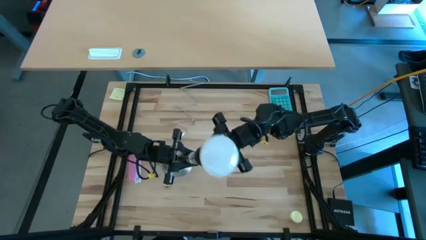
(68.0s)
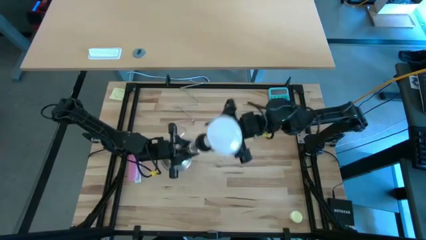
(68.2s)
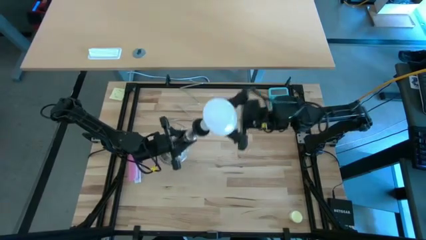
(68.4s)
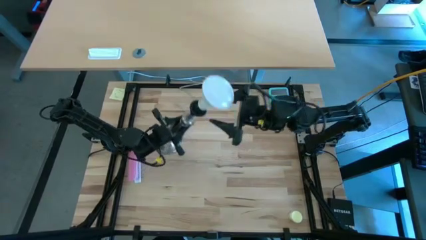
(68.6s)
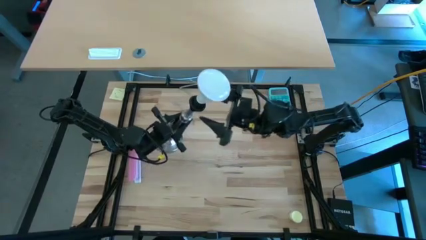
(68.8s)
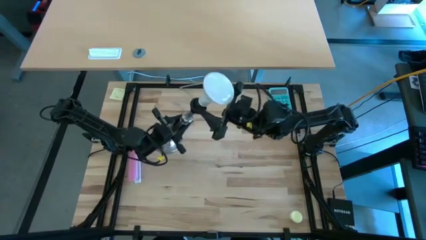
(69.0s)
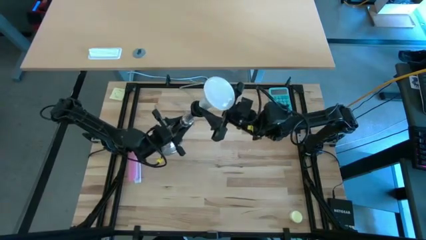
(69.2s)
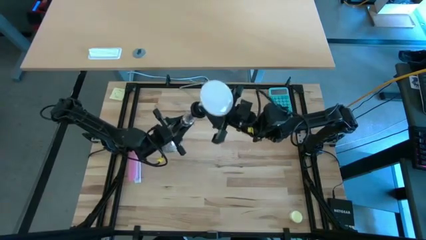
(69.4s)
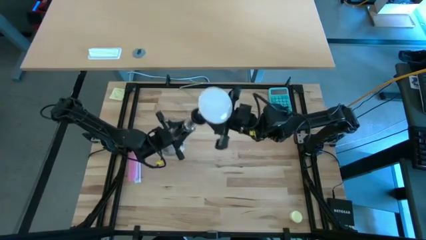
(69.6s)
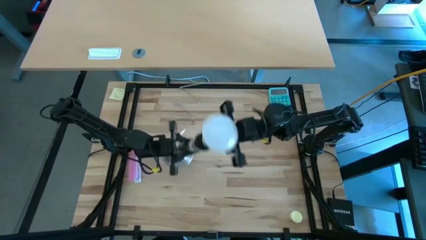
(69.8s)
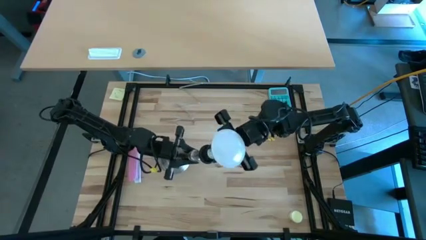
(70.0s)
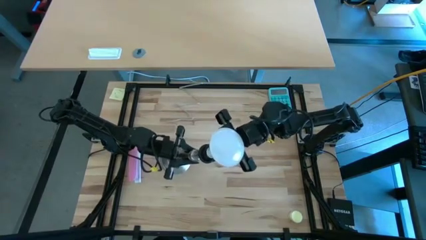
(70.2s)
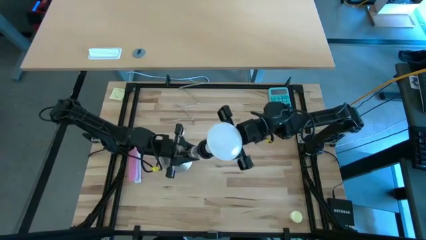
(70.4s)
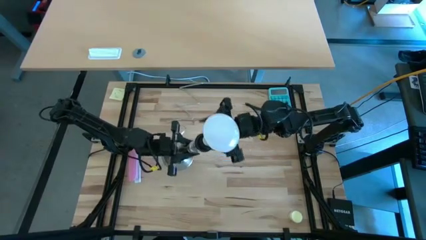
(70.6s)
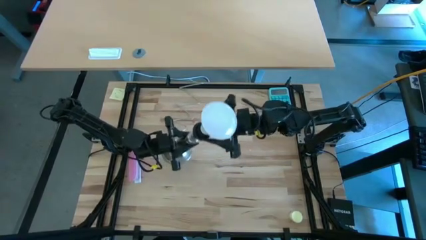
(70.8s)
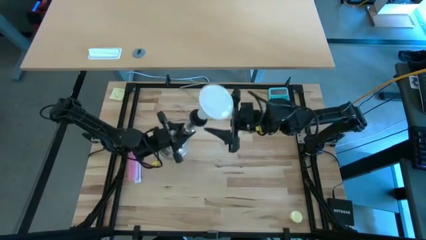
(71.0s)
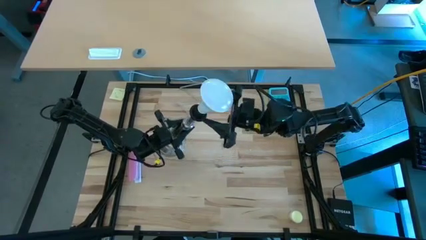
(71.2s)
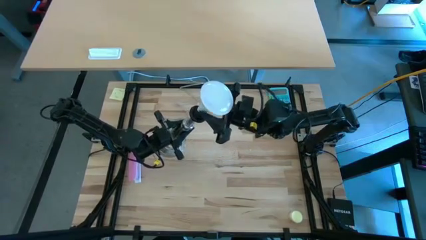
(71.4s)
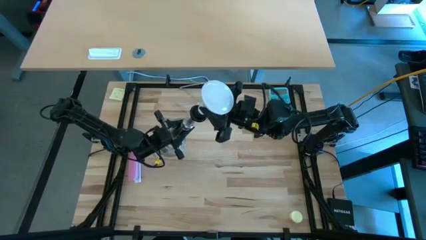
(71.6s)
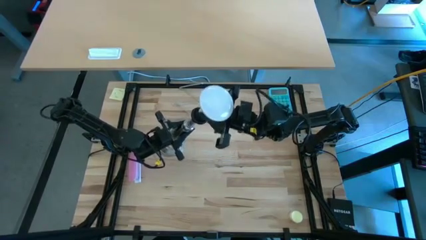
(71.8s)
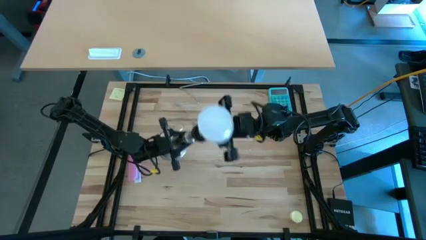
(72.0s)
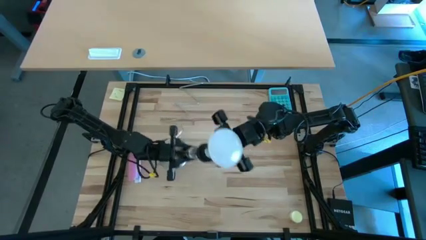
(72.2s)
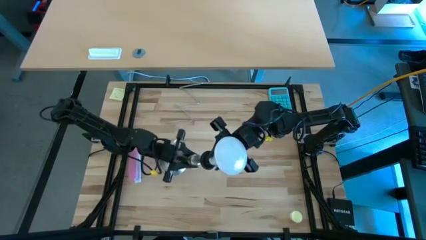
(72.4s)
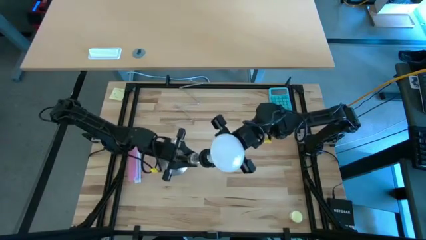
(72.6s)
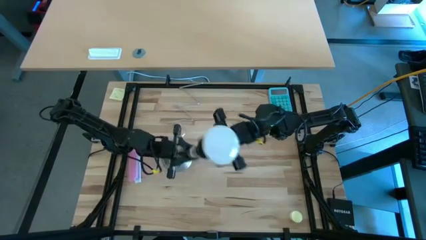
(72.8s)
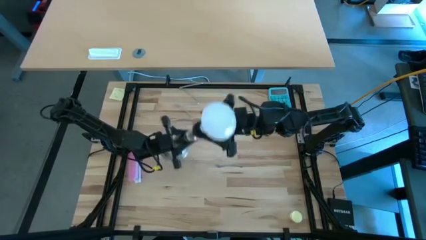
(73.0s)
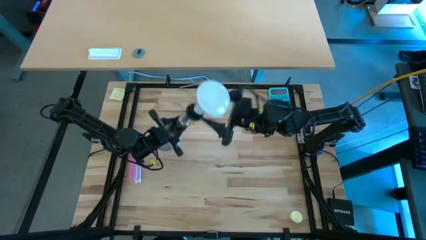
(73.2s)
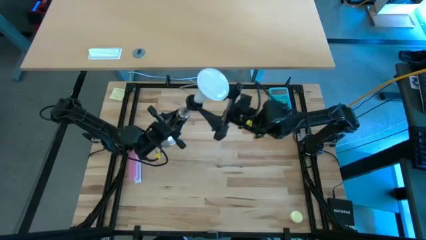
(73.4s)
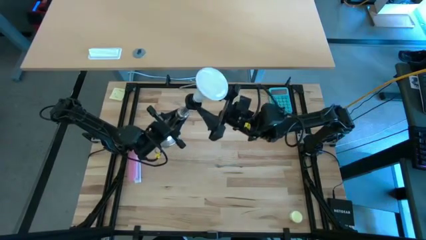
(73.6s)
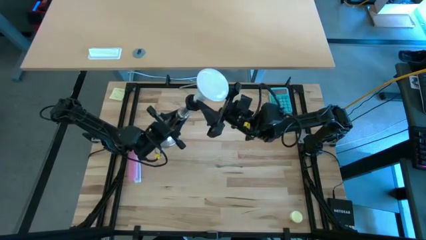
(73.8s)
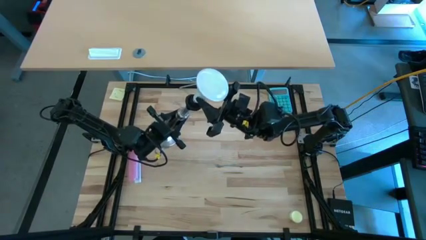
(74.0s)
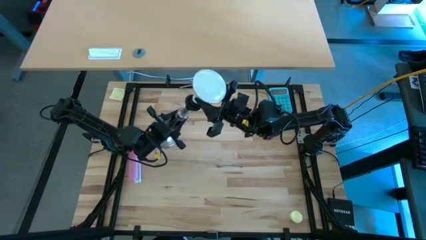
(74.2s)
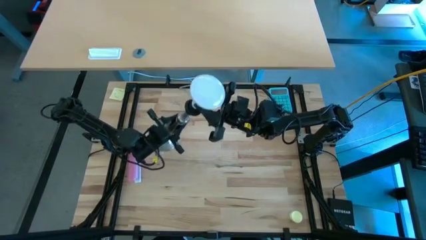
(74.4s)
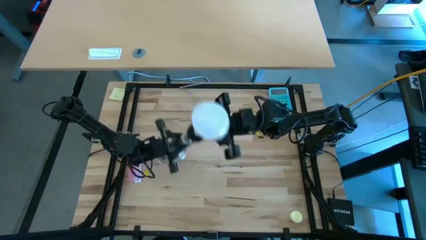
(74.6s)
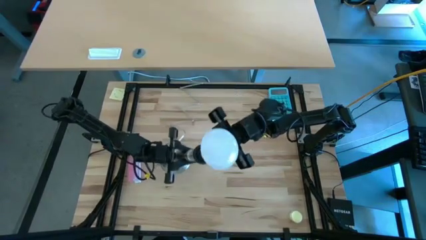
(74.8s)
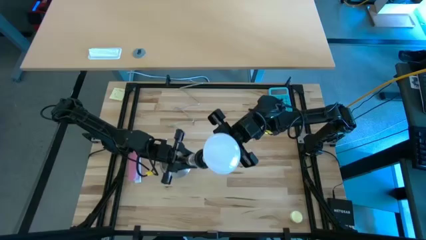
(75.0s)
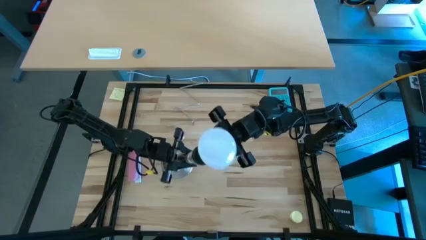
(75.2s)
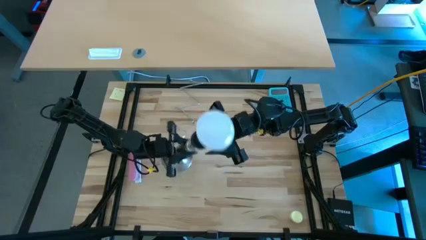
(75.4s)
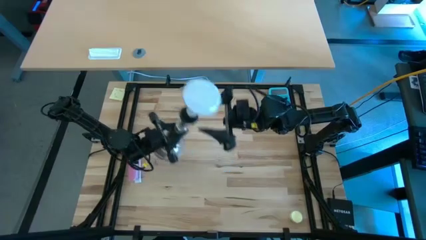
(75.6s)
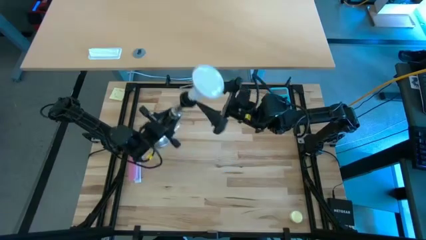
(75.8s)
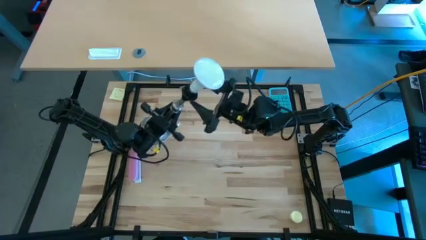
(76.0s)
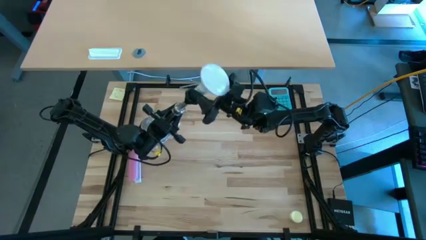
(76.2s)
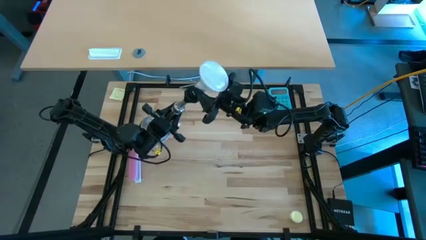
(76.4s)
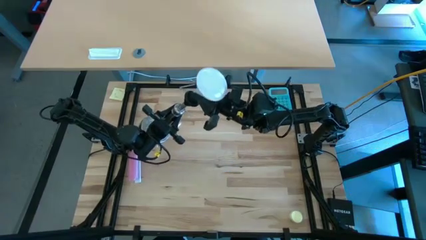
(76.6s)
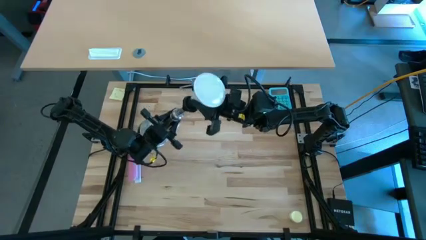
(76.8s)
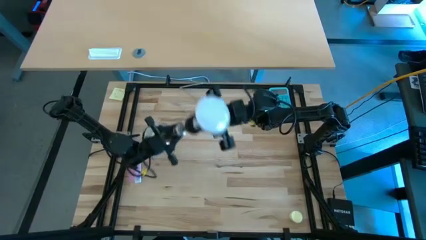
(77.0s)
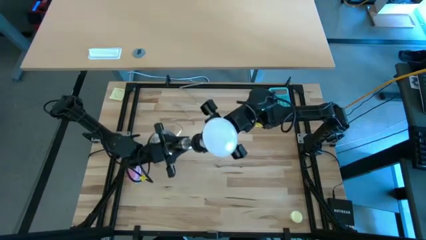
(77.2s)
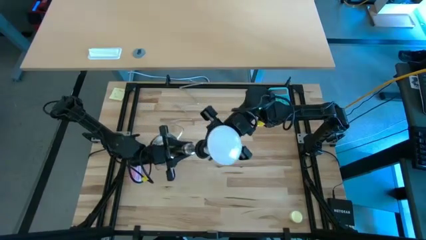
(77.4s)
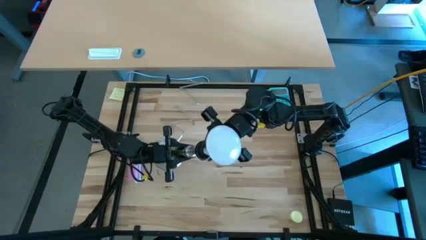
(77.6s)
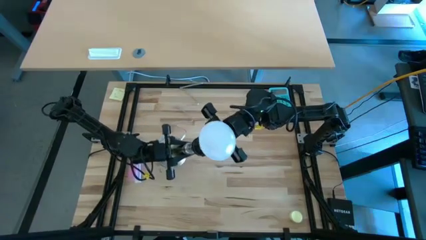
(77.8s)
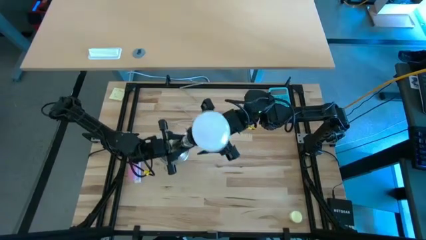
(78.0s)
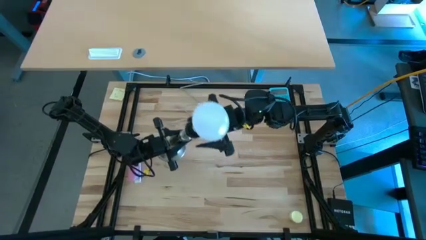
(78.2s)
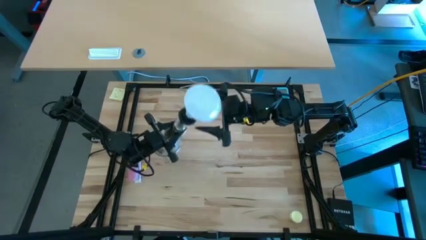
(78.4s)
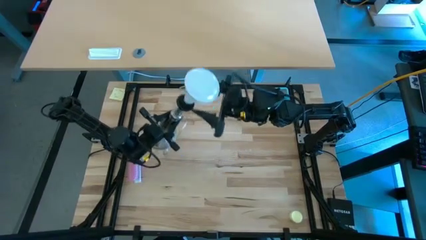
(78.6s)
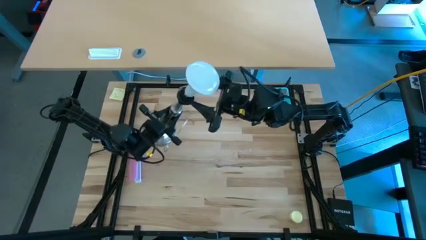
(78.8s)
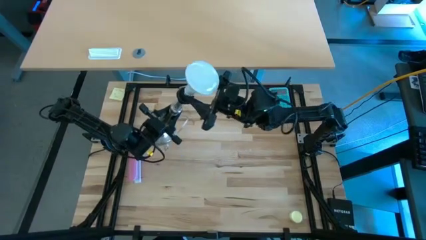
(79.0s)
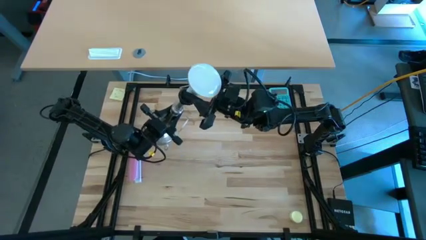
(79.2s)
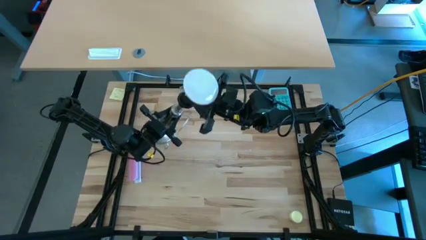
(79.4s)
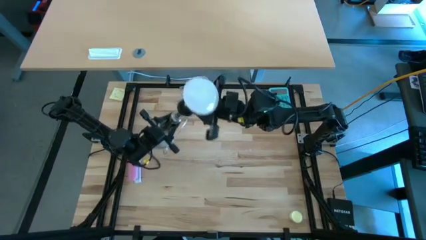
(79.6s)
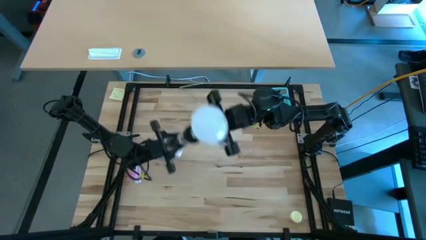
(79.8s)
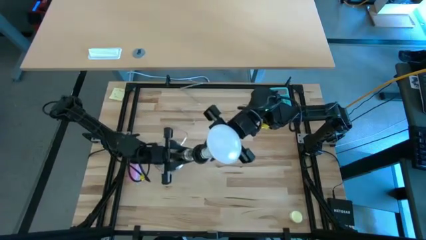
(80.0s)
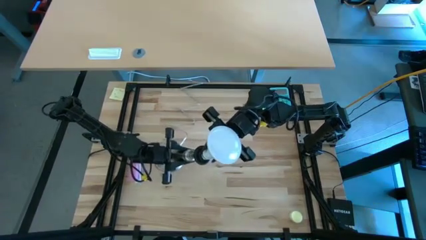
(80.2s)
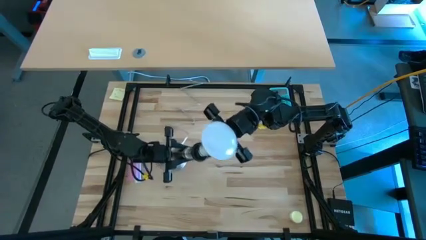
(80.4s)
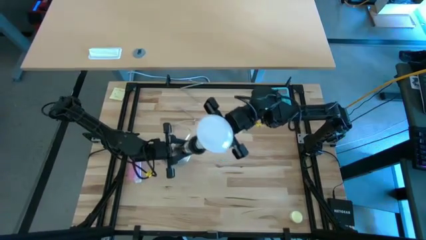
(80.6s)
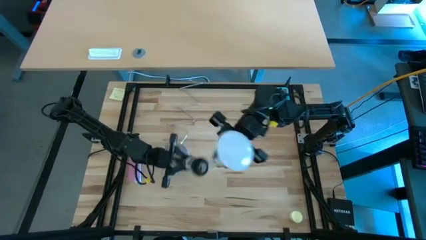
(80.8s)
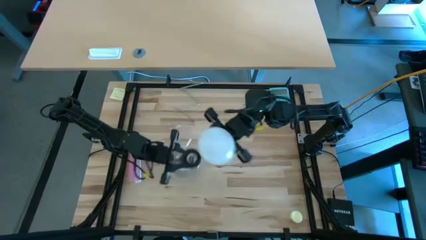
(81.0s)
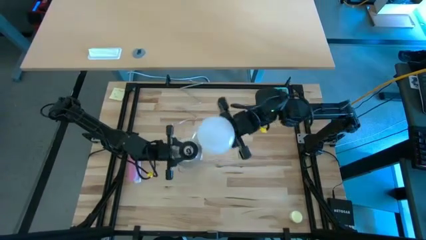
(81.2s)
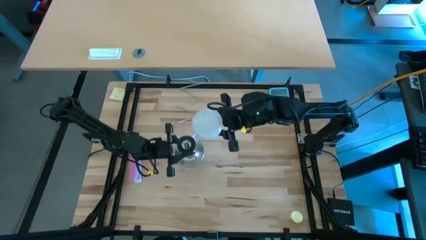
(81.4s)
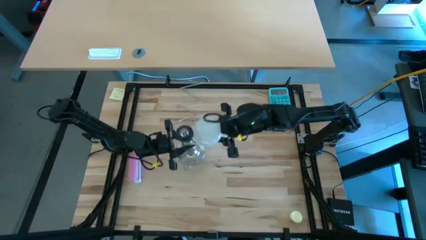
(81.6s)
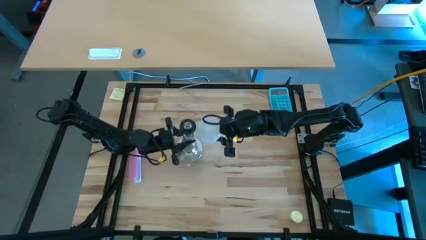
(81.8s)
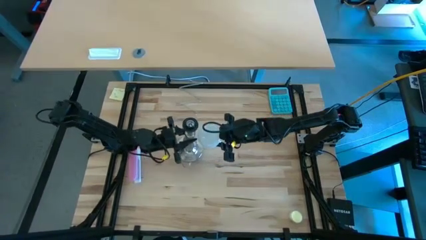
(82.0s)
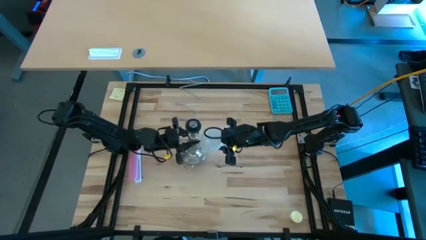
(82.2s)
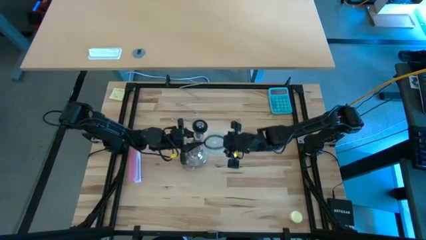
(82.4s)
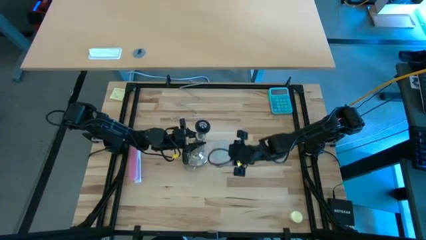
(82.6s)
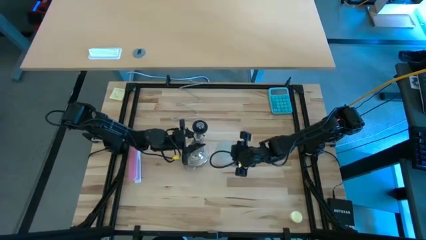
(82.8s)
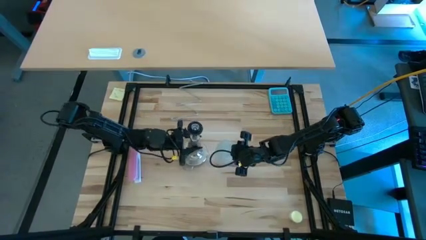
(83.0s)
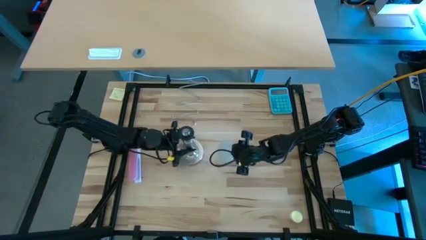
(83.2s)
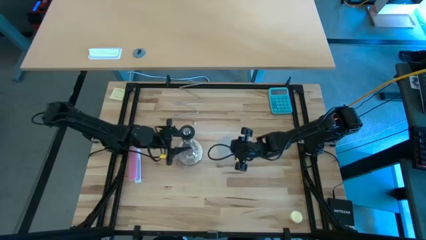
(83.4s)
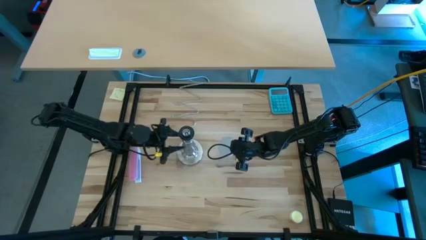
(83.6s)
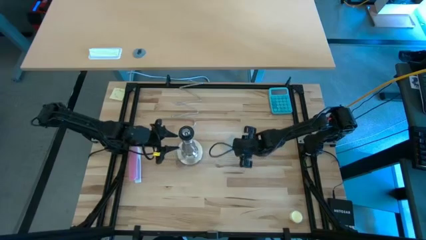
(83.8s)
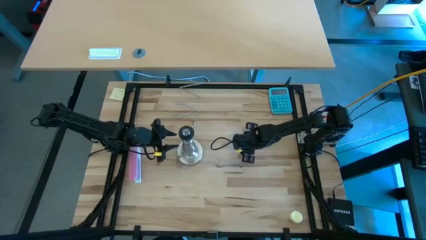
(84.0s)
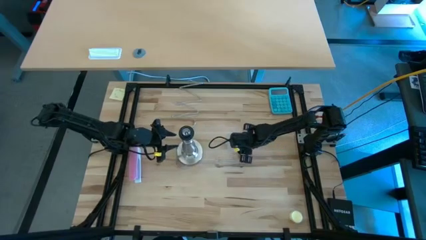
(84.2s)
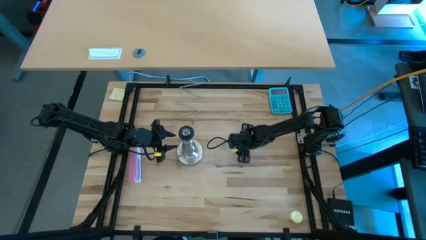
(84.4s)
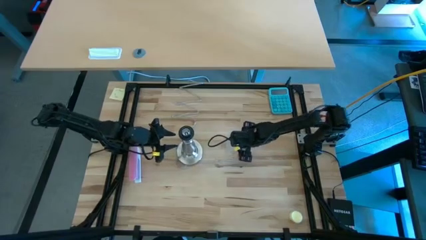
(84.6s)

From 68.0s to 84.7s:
Task: Screw lightbulb
Remove the white lightbulb from the silver lamp
